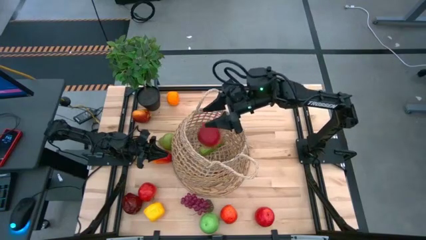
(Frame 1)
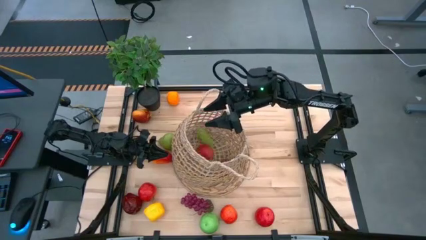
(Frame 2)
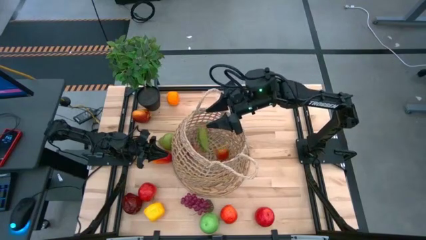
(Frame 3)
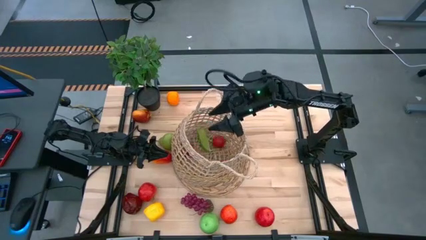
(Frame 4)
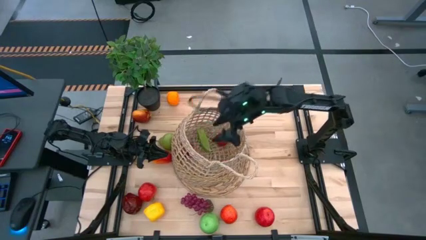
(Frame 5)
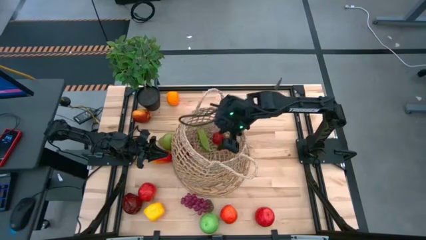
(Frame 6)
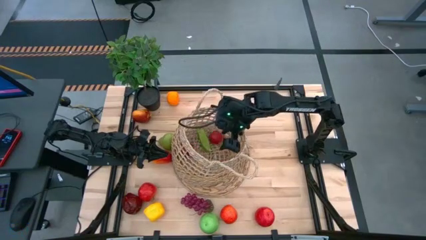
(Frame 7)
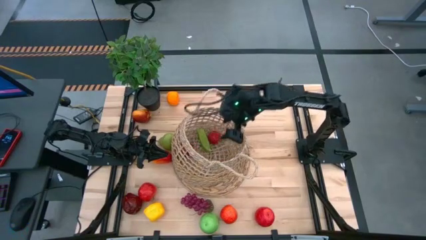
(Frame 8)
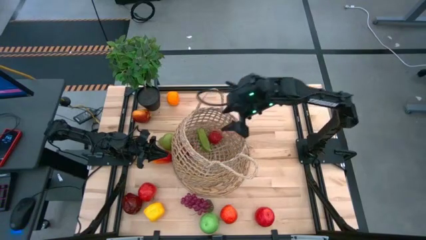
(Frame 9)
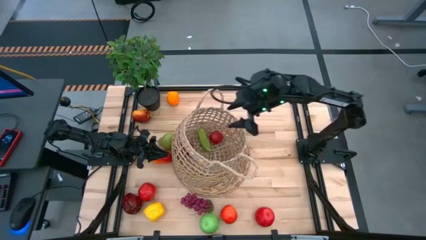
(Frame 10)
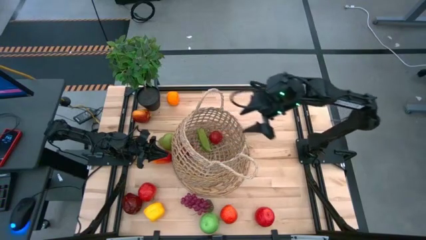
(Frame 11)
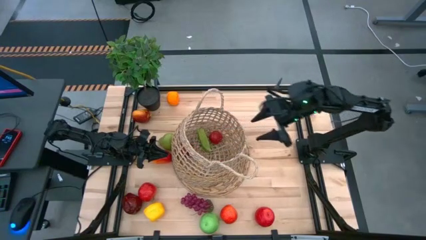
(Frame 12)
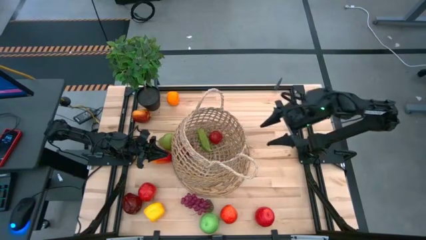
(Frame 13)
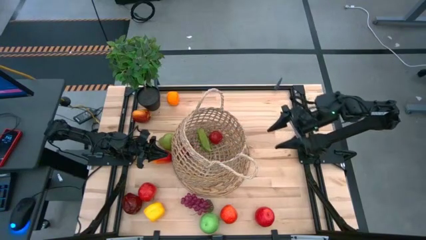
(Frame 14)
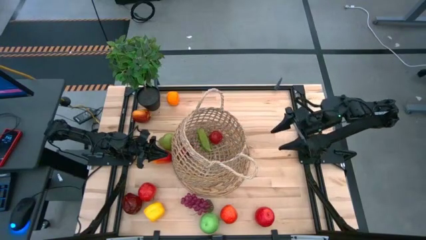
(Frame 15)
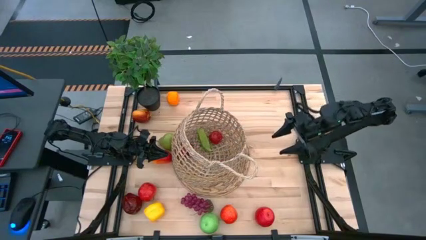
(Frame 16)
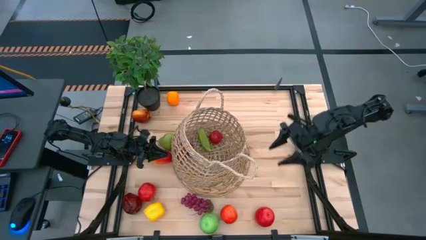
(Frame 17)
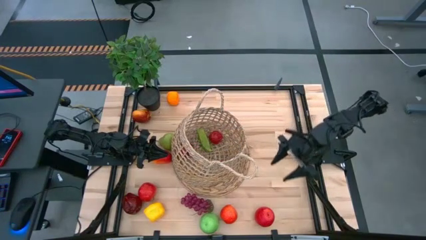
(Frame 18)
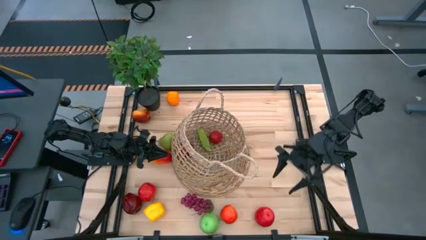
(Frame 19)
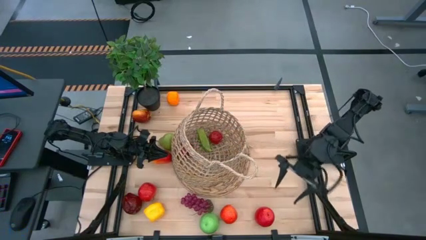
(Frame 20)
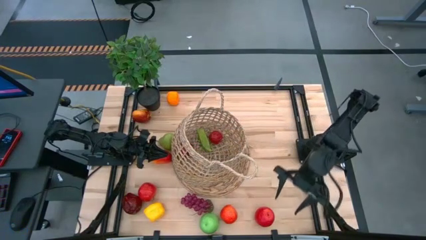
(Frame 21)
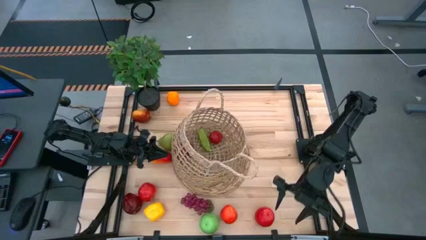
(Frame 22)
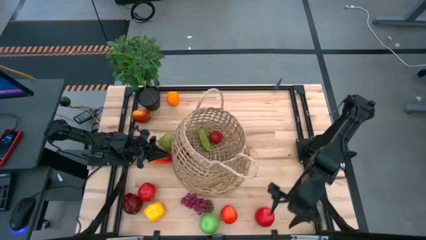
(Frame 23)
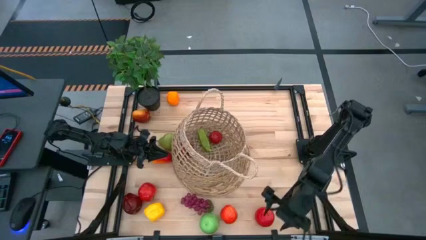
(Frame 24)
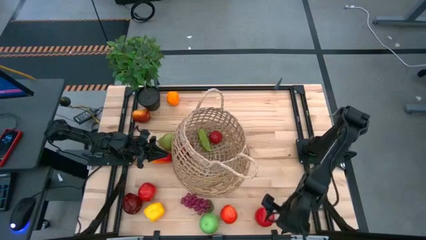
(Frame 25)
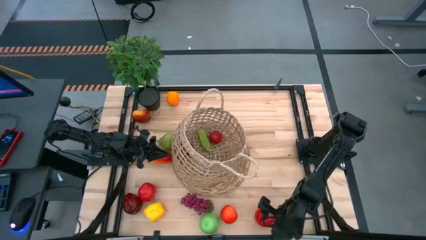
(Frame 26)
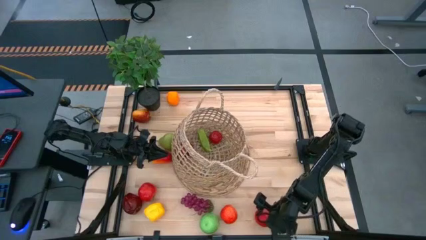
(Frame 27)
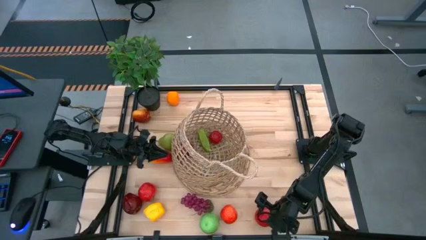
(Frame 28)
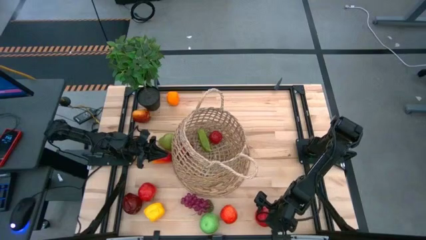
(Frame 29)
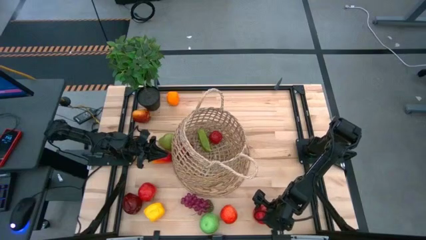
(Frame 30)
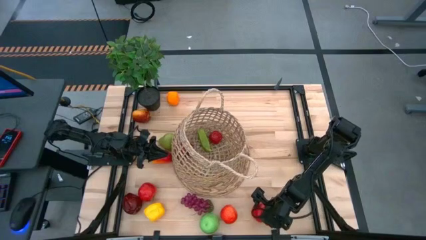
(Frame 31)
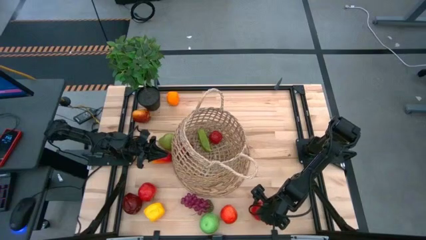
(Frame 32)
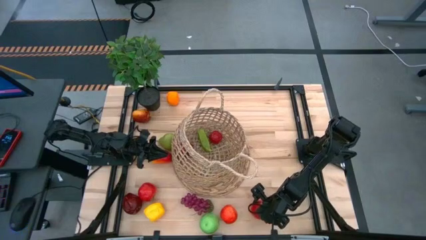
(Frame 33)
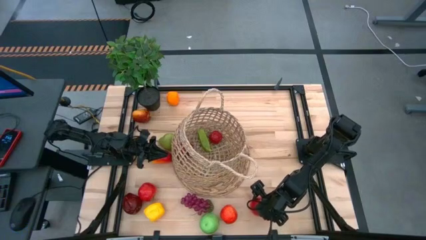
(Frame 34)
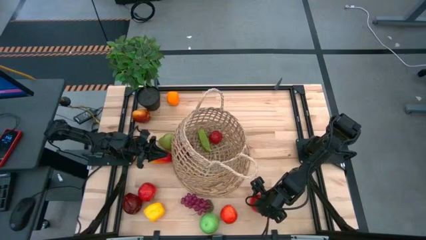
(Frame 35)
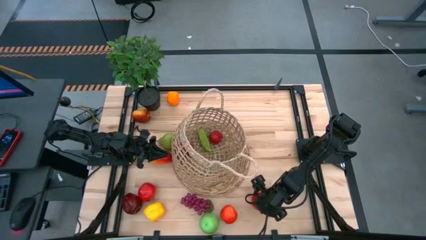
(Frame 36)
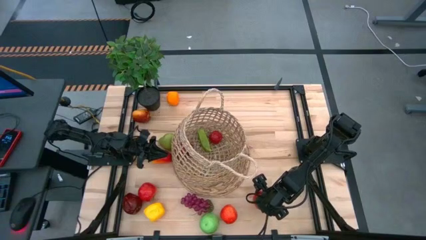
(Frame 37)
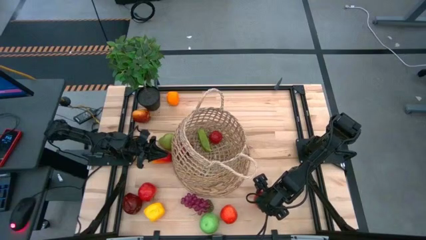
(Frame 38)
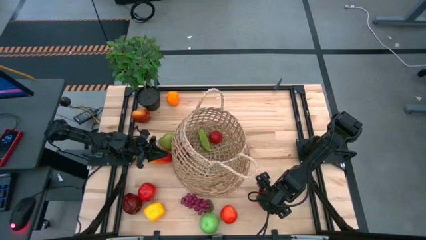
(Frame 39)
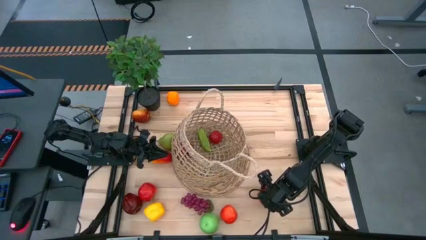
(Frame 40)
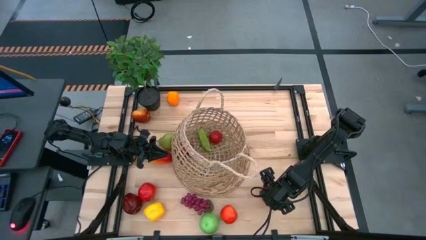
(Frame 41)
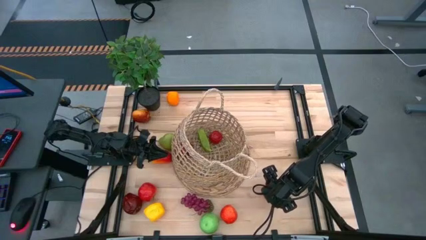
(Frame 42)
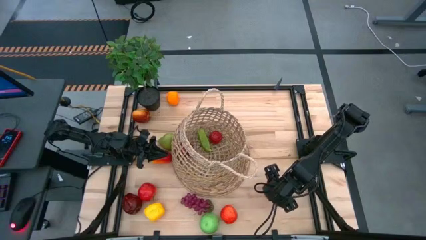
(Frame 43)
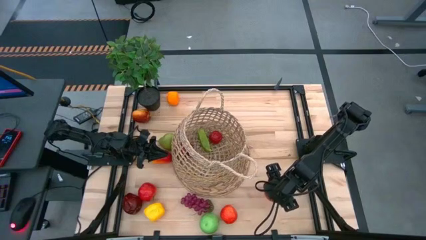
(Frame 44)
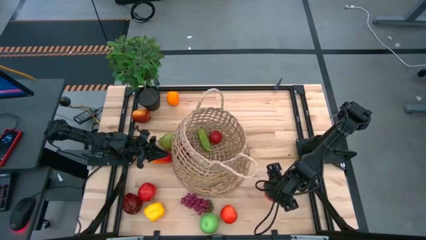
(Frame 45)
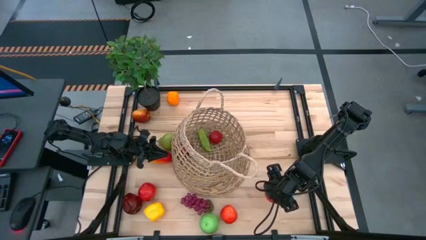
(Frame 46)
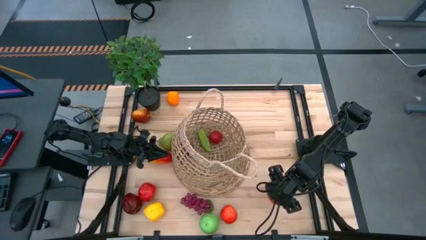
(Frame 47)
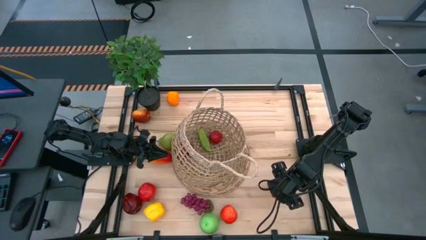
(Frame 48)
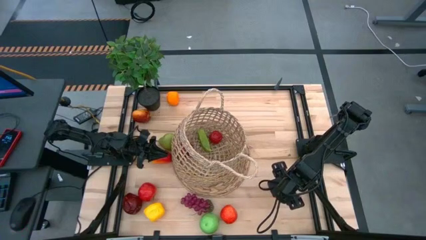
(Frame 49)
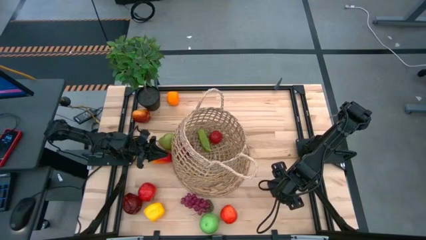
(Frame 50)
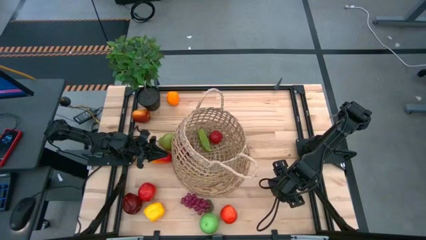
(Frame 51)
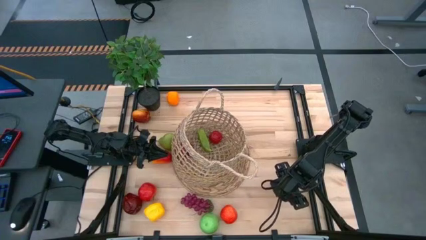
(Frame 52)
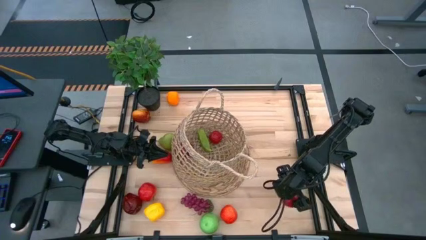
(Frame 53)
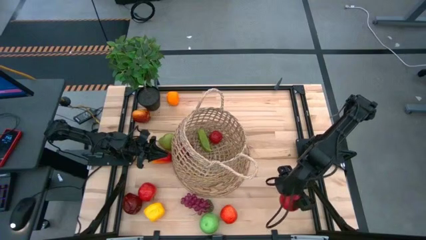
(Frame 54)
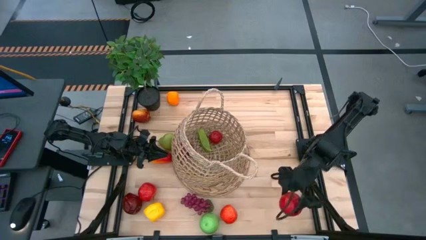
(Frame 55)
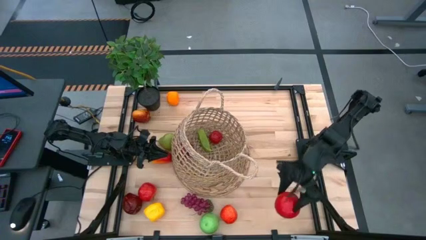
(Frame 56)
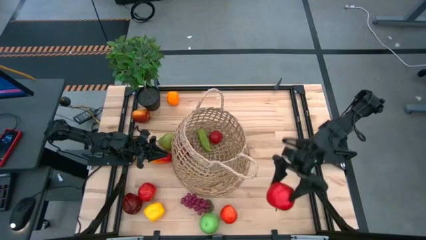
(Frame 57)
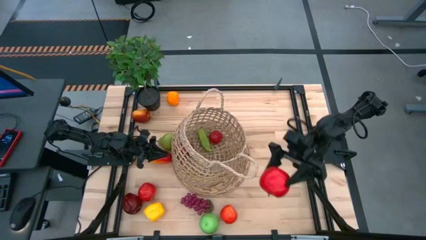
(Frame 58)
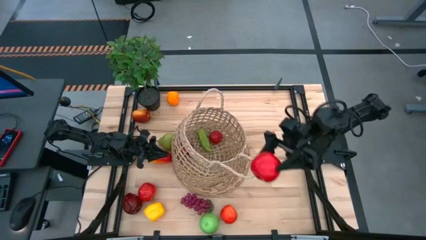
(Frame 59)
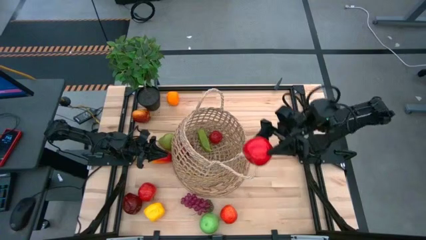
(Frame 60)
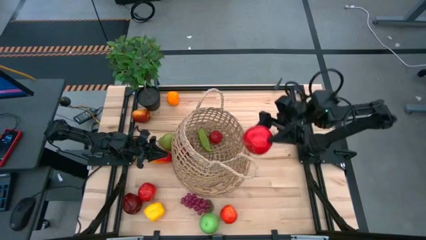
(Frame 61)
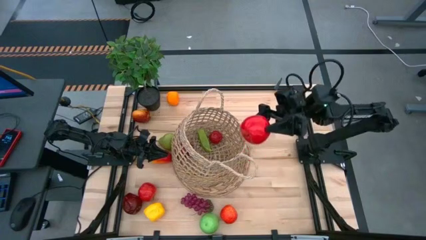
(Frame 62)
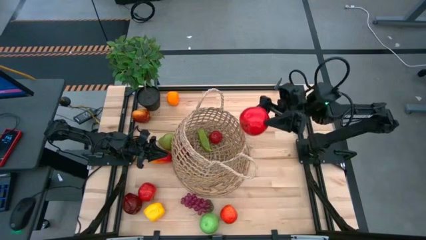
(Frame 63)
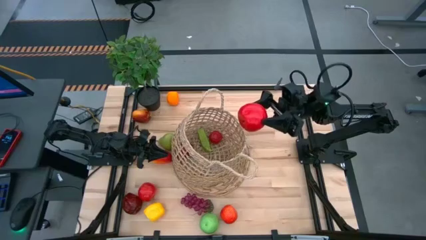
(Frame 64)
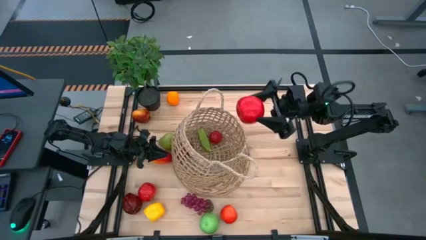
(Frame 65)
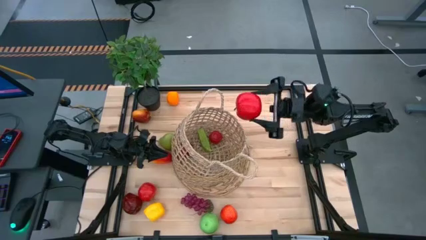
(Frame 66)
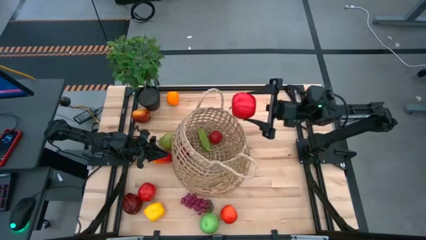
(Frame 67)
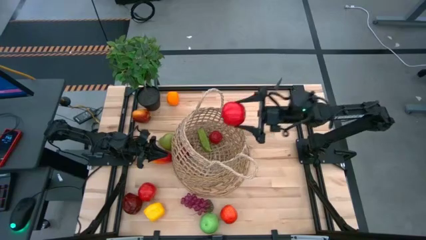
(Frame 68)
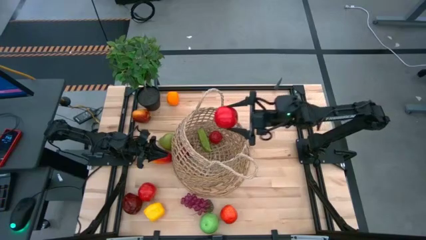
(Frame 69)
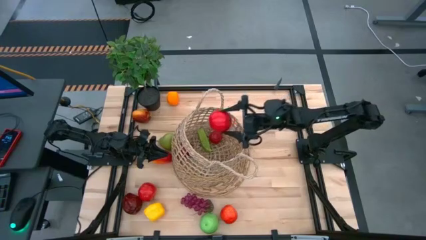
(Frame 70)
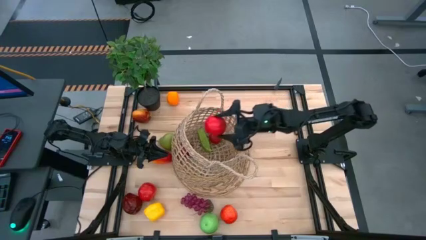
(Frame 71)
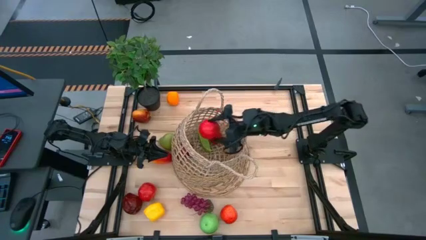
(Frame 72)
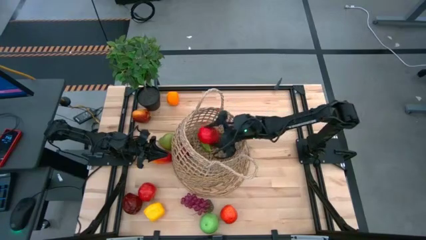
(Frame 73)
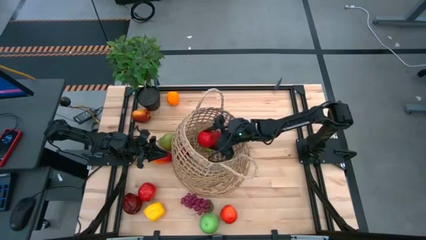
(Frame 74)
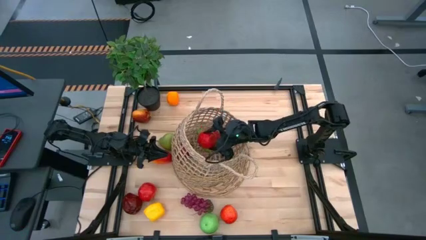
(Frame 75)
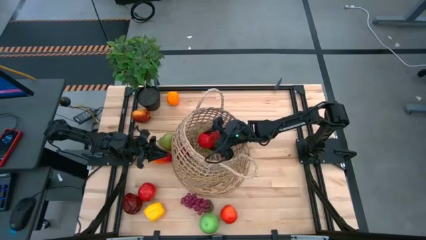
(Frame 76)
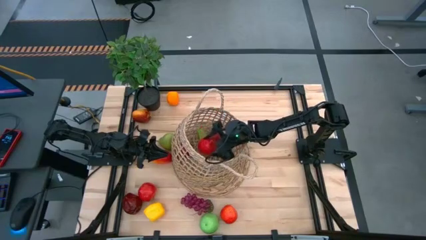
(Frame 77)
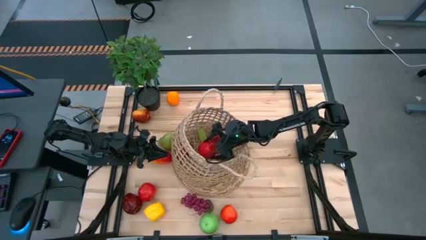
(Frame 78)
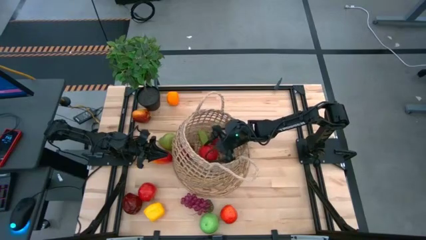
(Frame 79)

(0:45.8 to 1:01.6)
Task: Build produce basket
Put the apple into the basket
